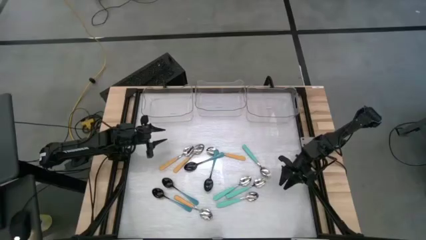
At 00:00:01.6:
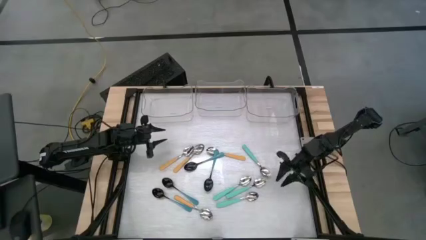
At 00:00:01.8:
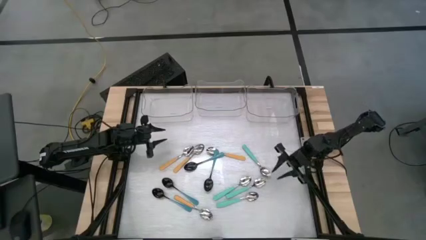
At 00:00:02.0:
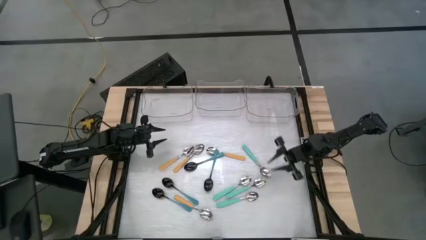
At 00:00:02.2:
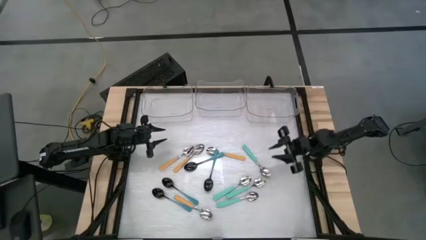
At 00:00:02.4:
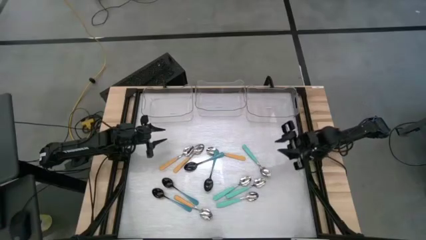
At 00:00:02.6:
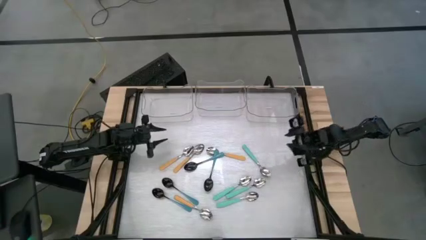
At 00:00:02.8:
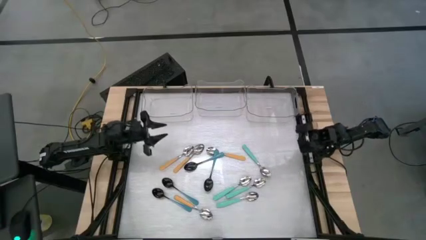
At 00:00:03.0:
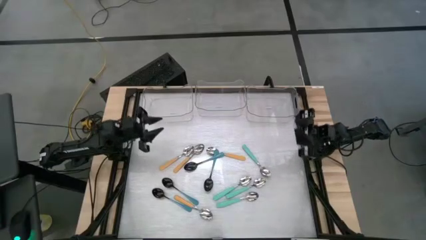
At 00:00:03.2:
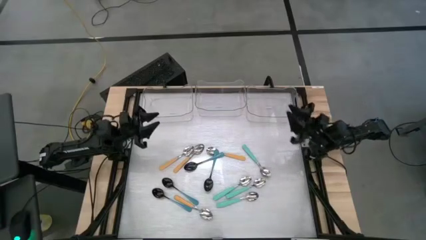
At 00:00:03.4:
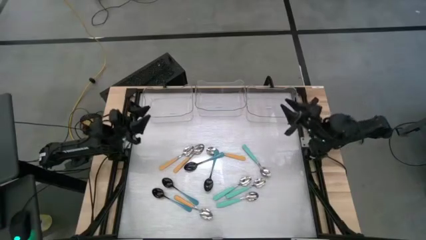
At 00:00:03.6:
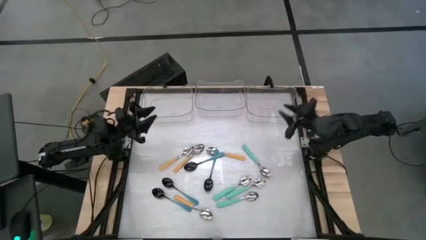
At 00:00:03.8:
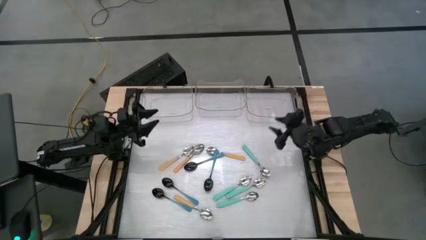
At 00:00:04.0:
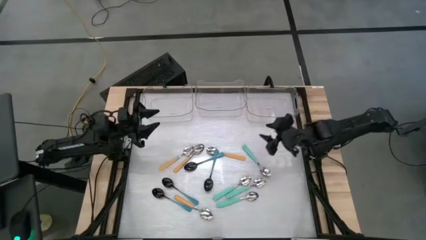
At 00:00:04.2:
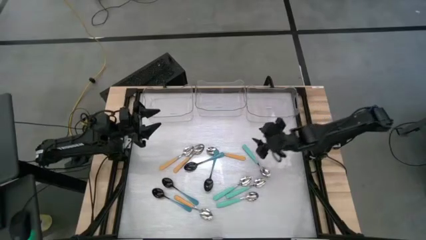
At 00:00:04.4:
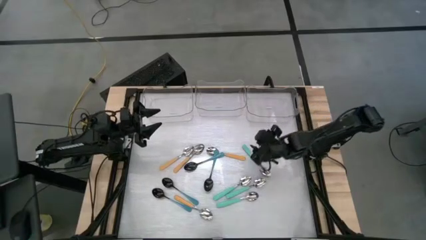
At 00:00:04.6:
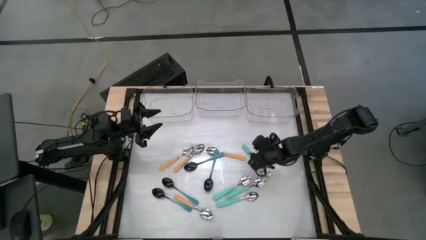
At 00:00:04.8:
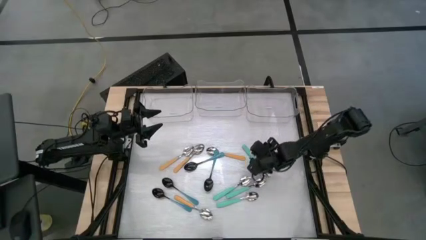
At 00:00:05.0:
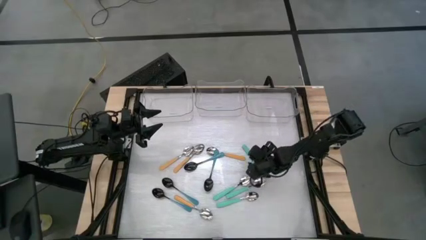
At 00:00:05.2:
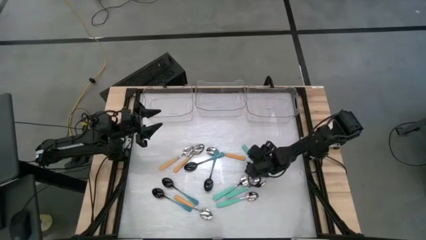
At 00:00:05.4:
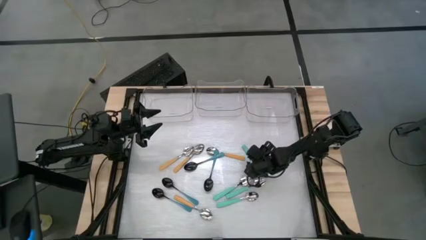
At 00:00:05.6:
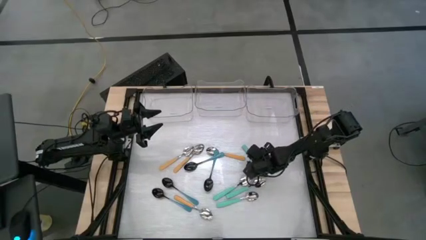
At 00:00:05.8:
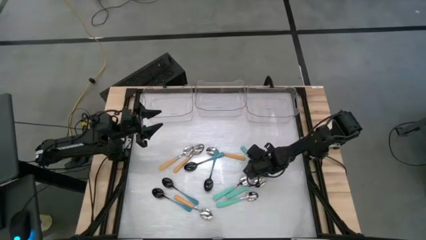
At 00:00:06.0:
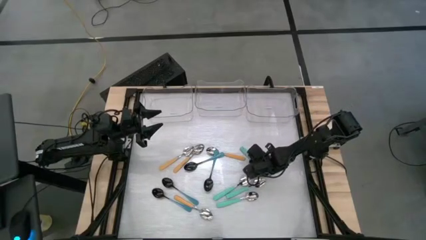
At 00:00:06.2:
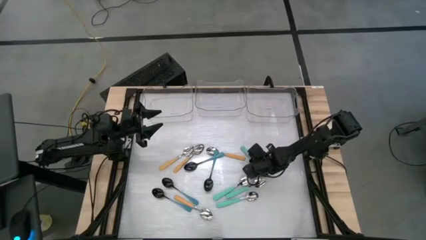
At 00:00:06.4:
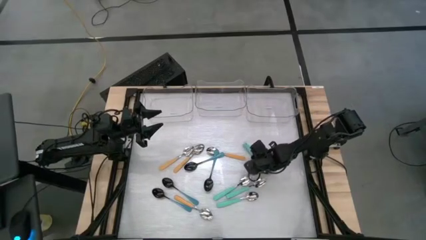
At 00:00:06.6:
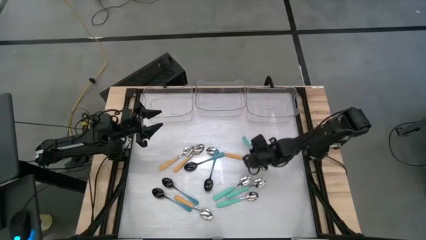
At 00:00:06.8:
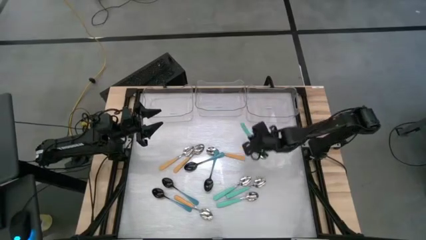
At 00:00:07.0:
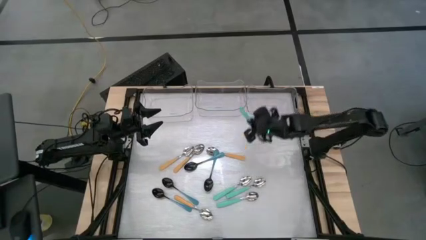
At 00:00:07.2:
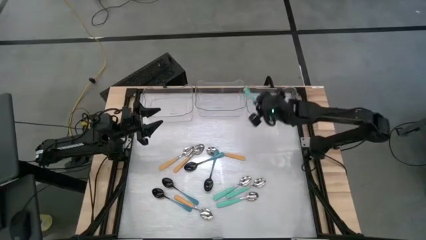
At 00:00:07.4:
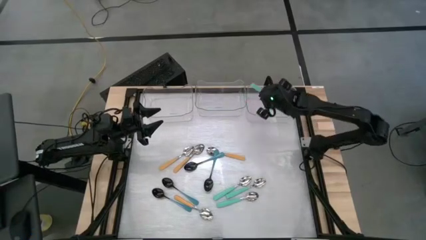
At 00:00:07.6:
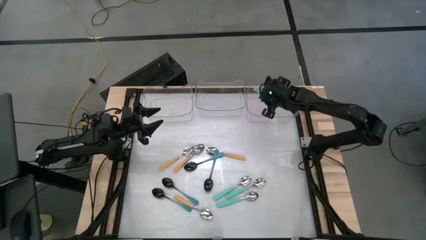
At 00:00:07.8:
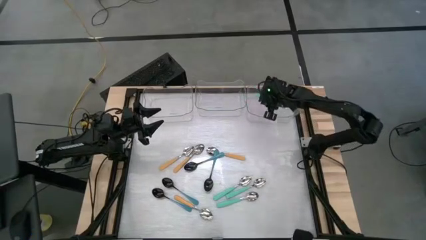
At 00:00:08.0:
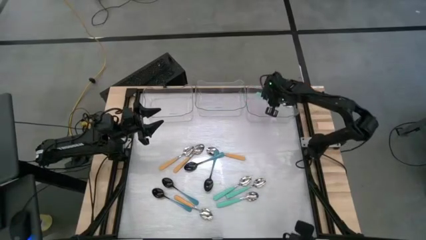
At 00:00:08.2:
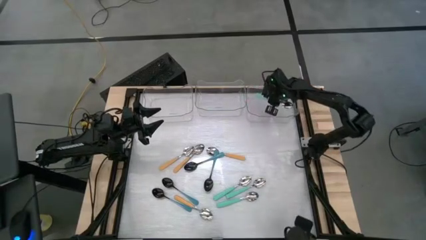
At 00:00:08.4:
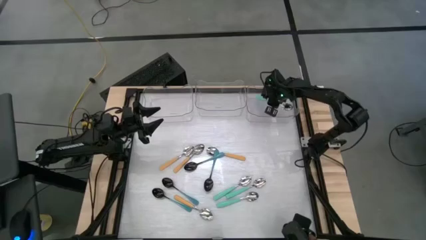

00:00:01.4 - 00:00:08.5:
Task: Sort silverware by color (type)
Put the middle right light blue spoon into the top right transparent bin

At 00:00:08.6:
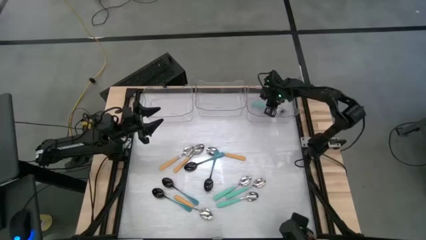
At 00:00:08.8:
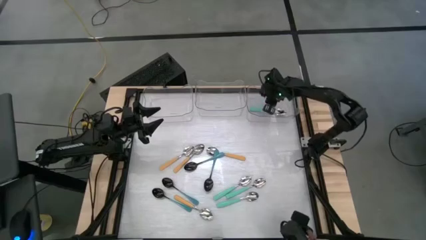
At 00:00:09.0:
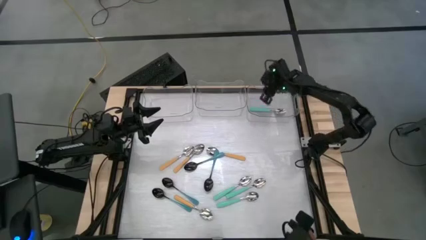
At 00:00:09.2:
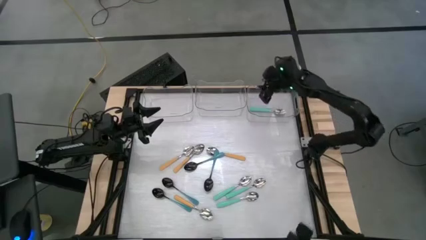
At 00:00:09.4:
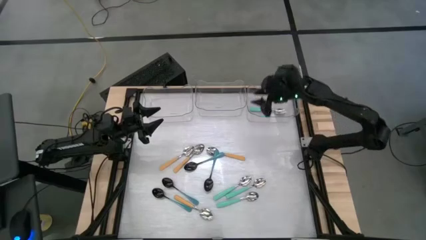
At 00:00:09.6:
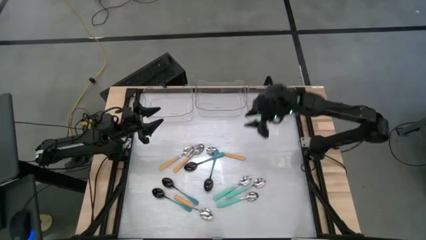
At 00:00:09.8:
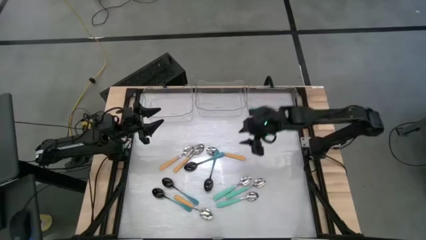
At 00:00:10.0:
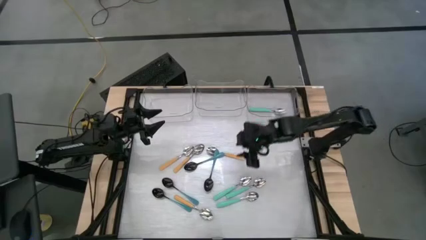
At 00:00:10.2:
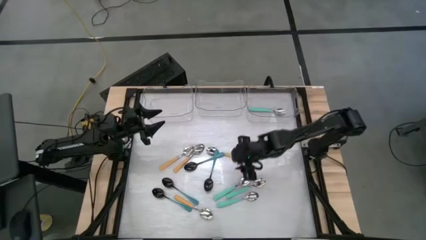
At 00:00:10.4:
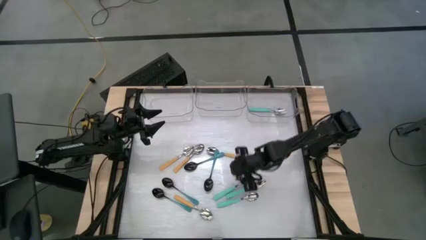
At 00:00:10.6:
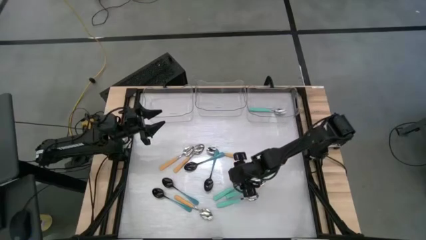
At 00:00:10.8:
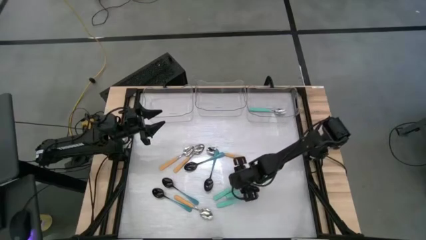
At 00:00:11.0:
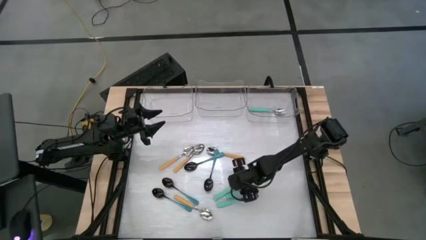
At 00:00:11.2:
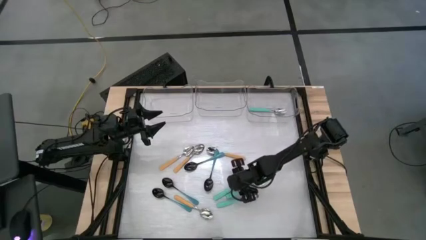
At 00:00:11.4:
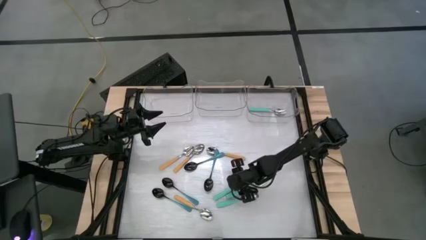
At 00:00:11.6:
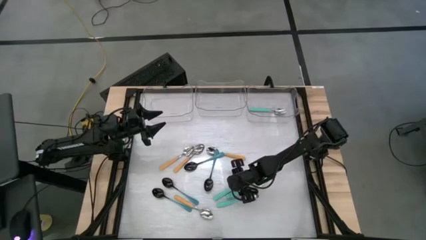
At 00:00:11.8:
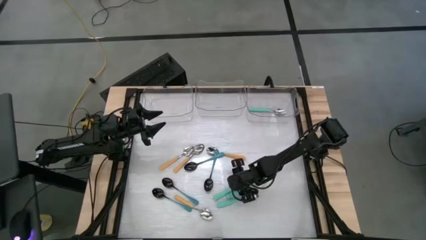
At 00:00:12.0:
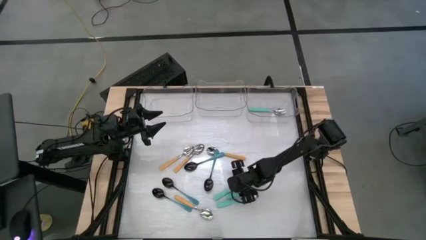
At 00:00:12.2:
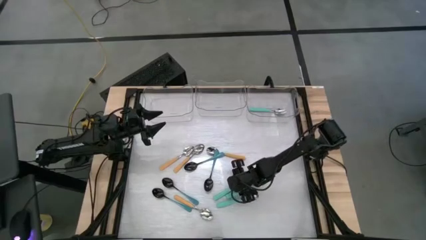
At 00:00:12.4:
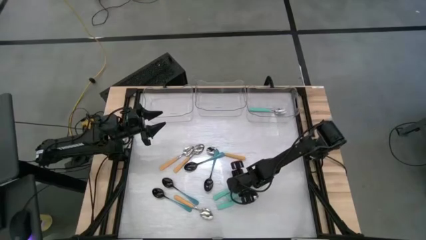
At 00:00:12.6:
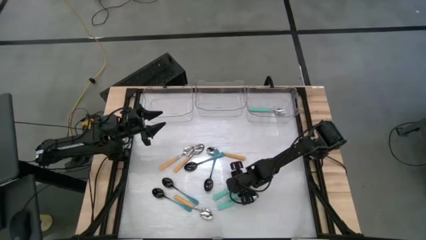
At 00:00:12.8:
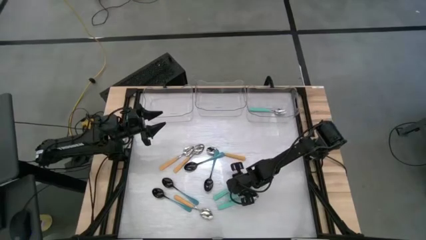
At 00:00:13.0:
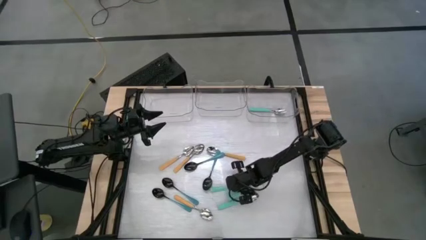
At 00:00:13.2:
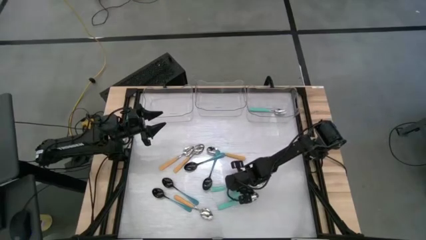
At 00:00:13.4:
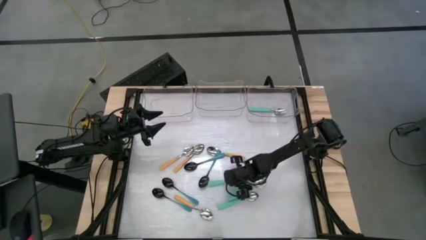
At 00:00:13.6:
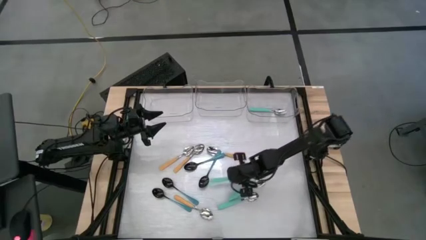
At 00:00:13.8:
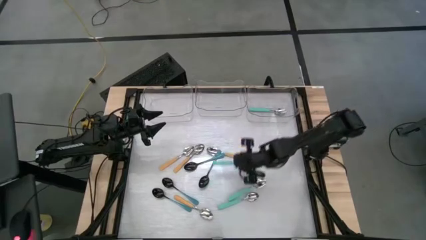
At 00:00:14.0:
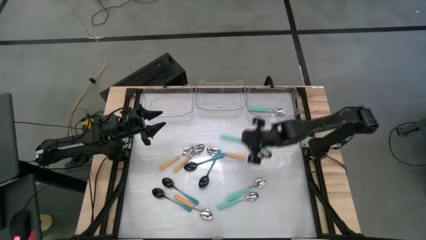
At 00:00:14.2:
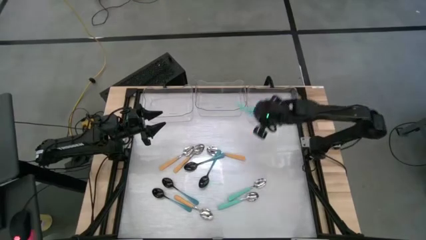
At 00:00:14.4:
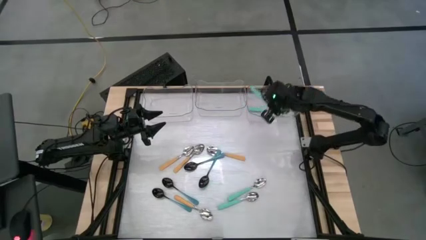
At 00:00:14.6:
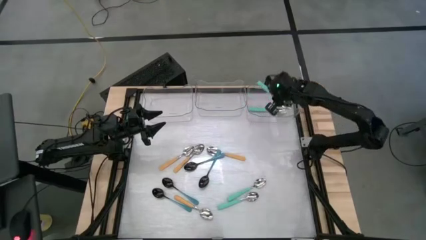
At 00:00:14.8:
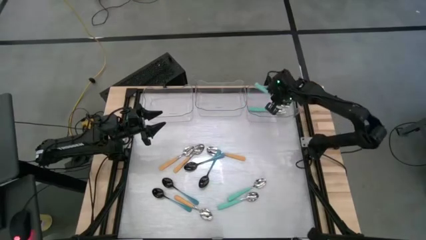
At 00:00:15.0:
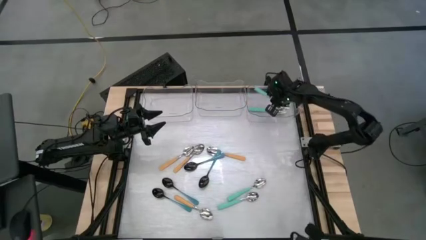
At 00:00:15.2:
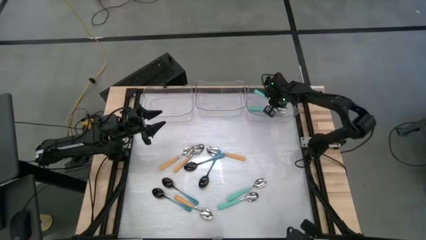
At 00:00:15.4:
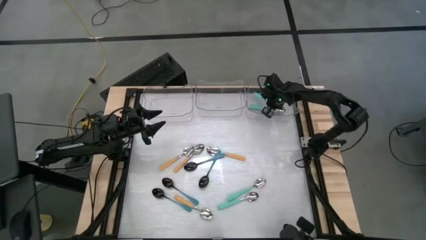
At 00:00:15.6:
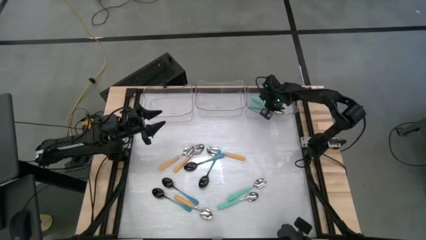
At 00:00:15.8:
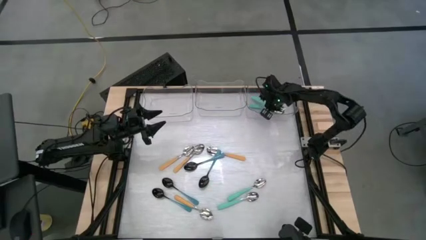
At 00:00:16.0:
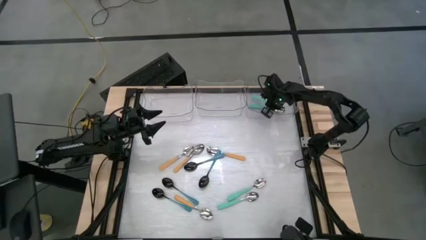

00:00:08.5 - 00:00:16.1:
Put the middle left light blue spoon into the top right transparent bin

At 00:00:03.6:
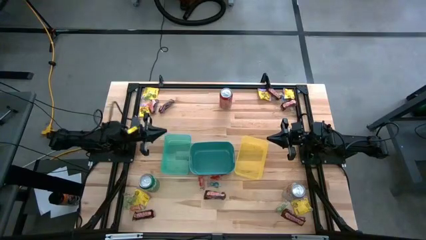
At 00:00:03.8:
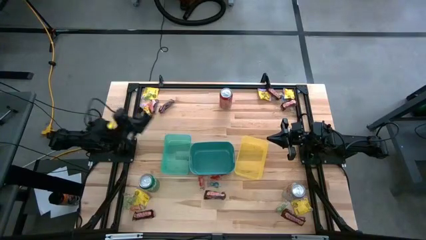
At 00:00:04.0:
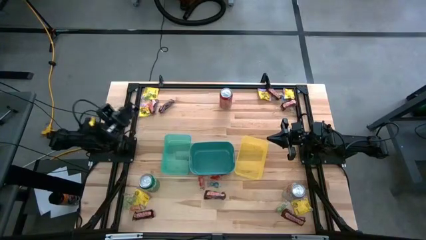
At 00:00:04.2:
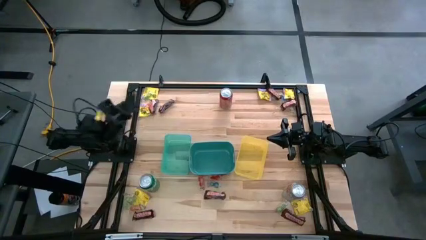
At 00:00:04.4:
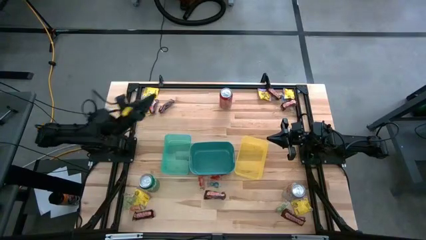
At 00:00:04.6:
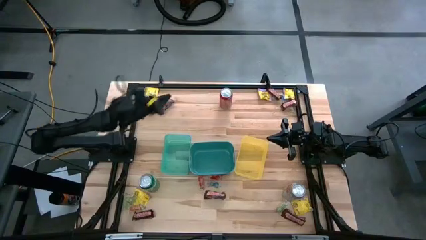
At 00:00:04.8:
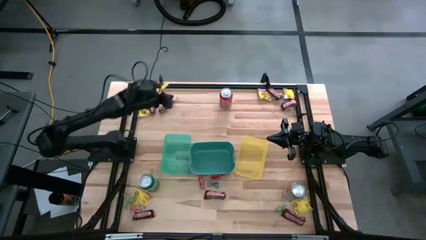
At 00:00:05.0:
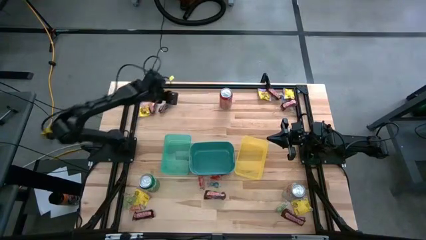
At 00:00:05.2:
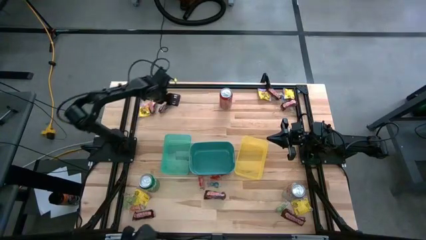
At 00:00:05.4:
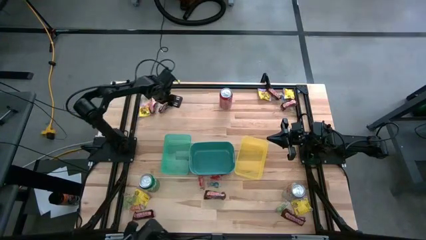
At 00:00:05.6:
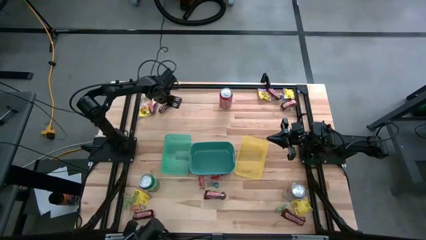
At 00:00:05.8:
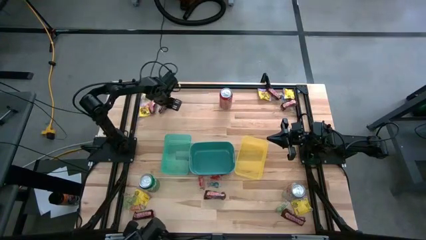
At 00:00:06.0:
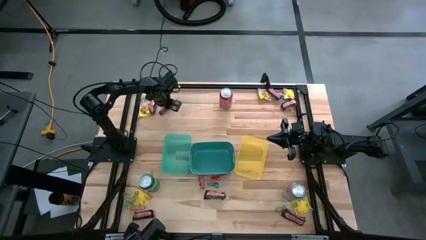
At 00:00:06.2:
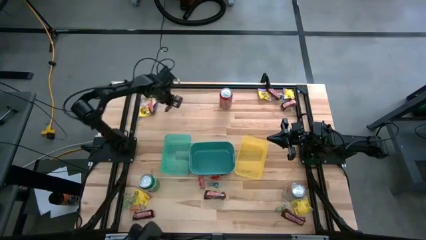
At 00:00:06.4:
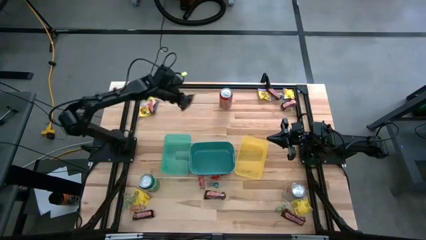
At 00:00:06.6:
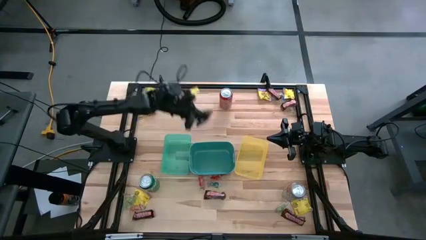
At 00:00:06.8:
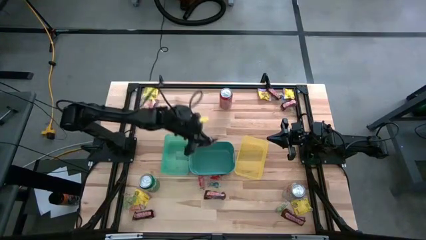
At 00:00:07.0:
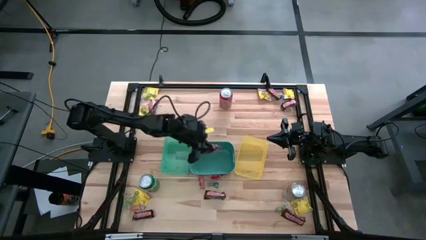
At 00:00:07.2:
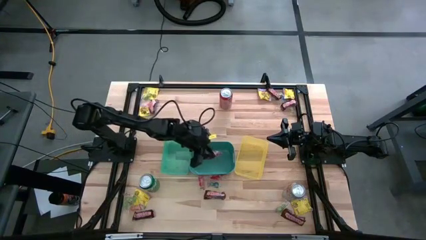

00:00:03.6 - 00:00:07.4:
Task: Sort candy
Put the chocolate bar into the blue bin
